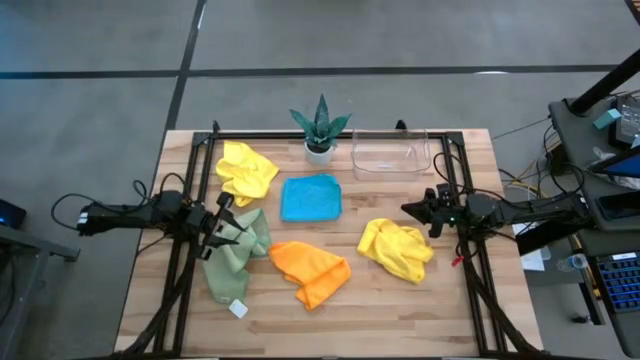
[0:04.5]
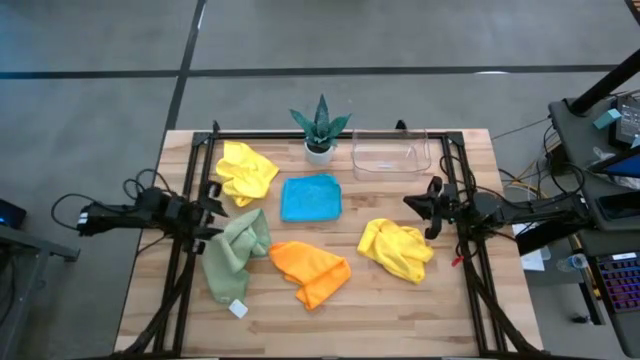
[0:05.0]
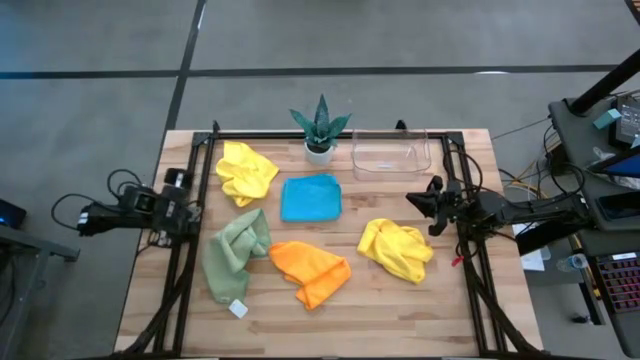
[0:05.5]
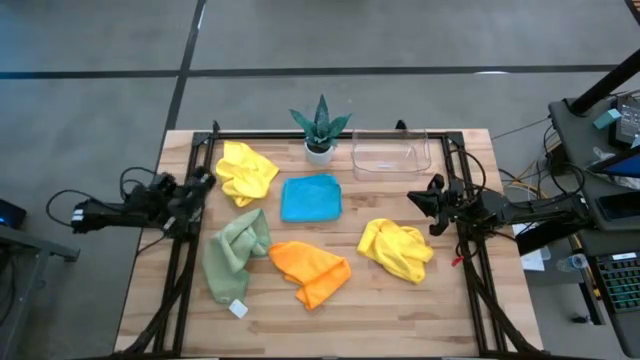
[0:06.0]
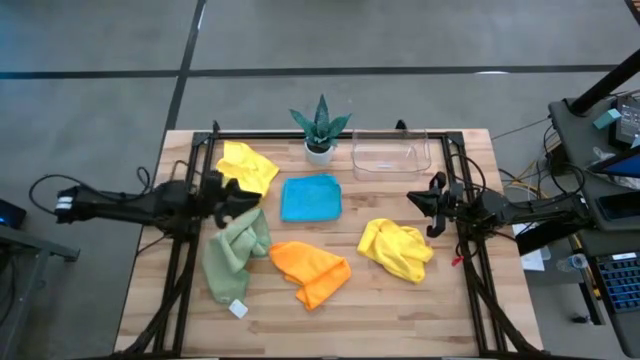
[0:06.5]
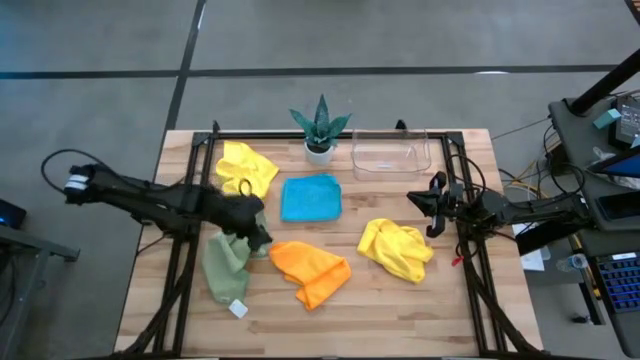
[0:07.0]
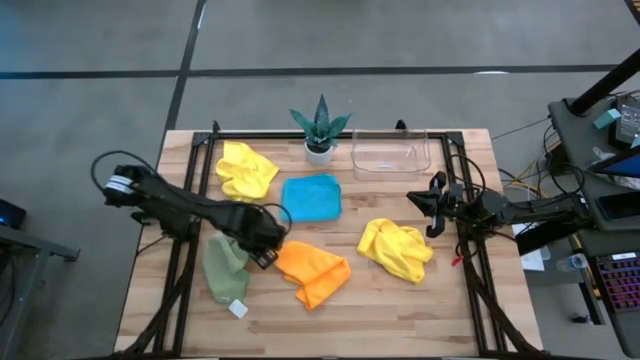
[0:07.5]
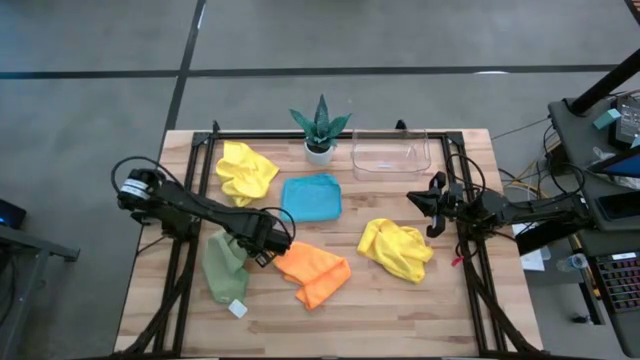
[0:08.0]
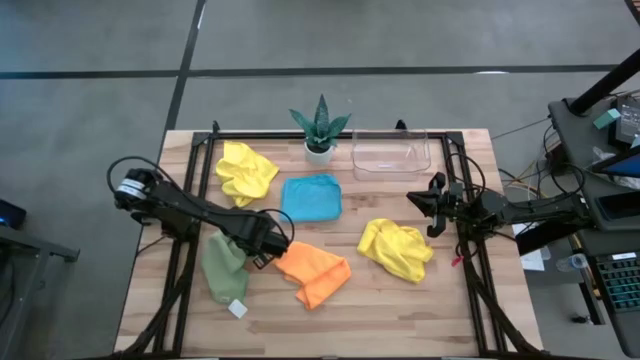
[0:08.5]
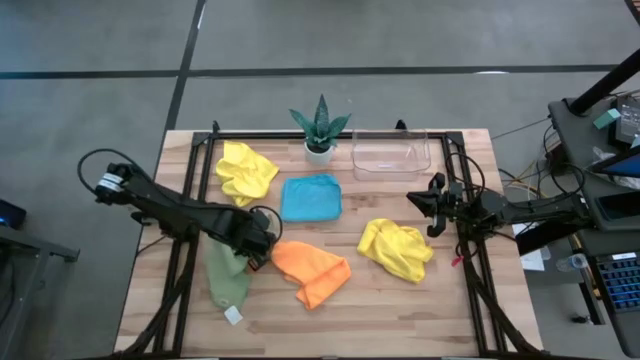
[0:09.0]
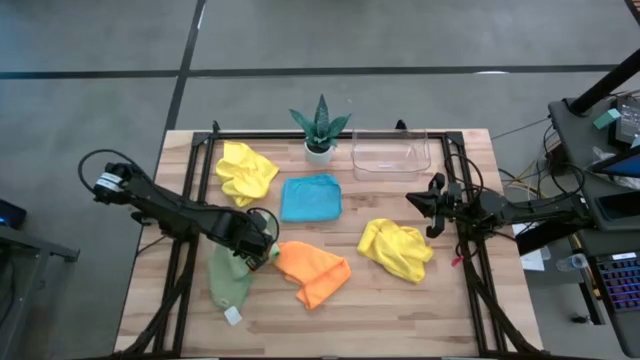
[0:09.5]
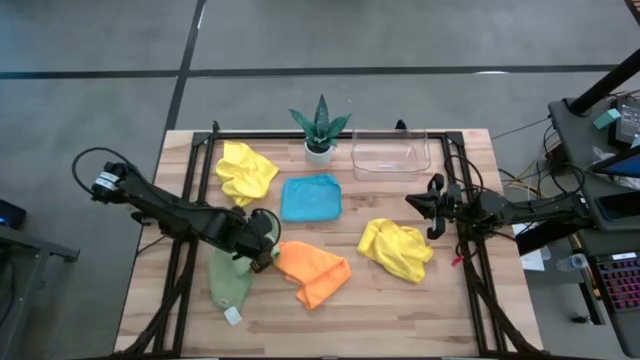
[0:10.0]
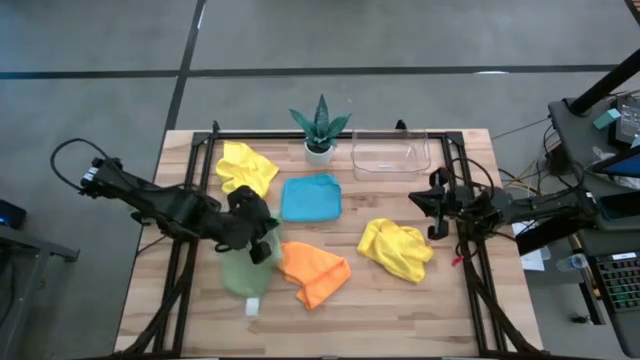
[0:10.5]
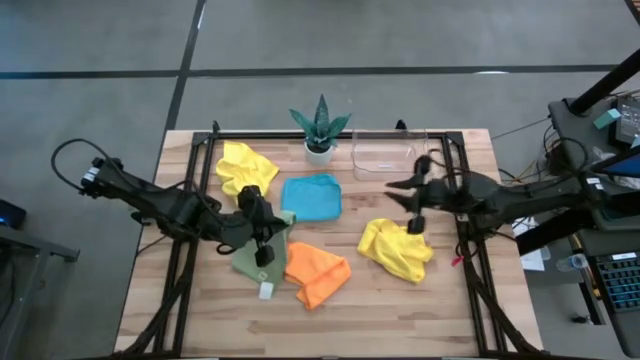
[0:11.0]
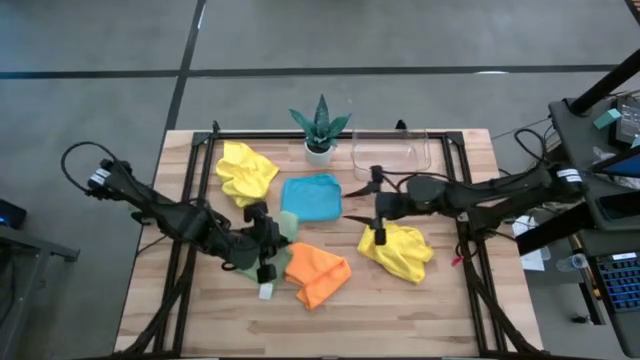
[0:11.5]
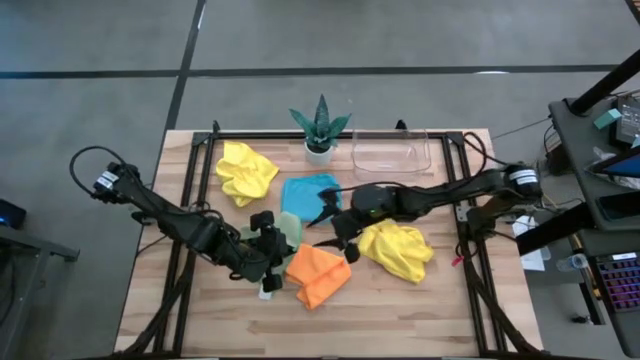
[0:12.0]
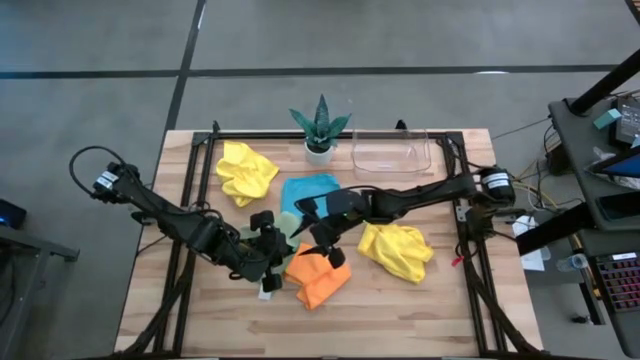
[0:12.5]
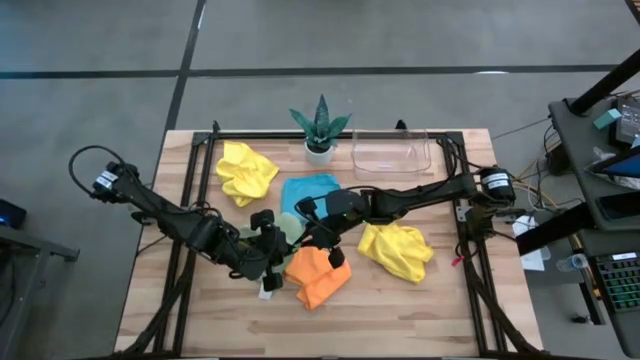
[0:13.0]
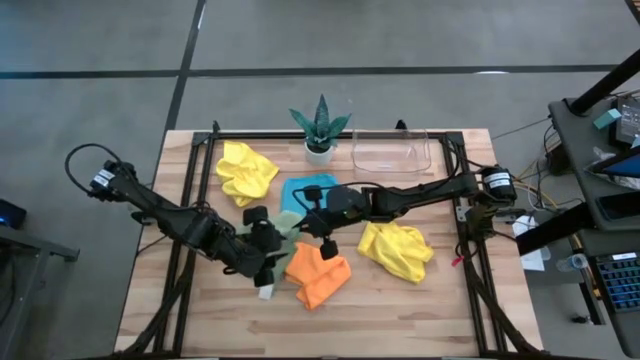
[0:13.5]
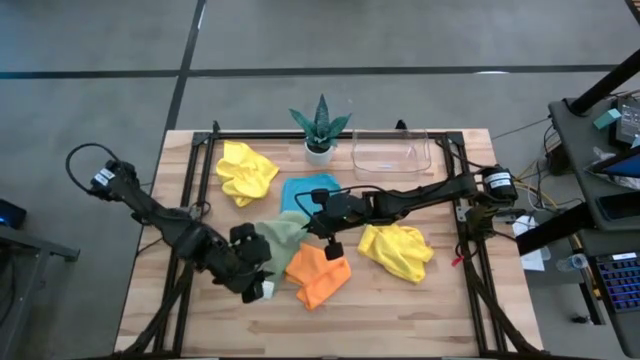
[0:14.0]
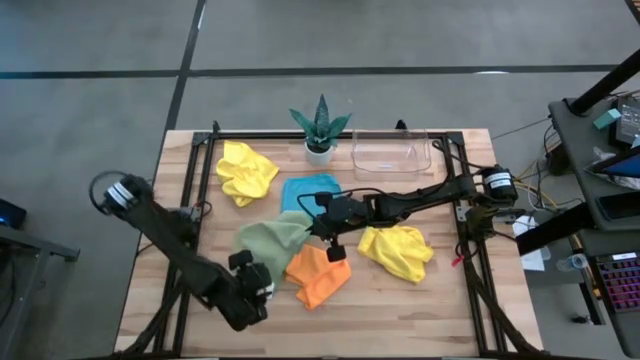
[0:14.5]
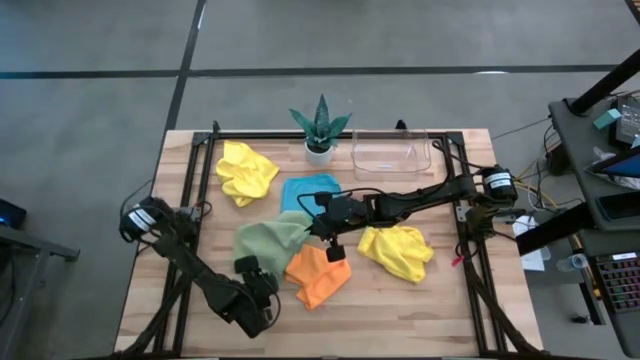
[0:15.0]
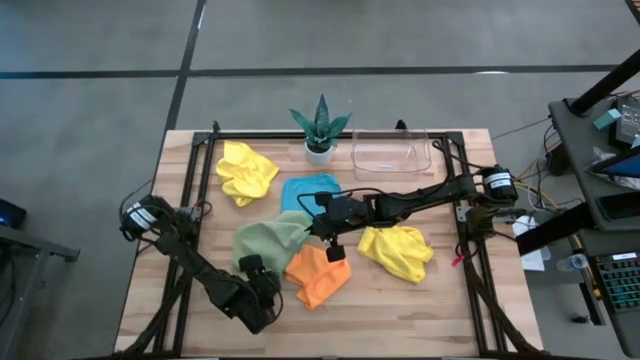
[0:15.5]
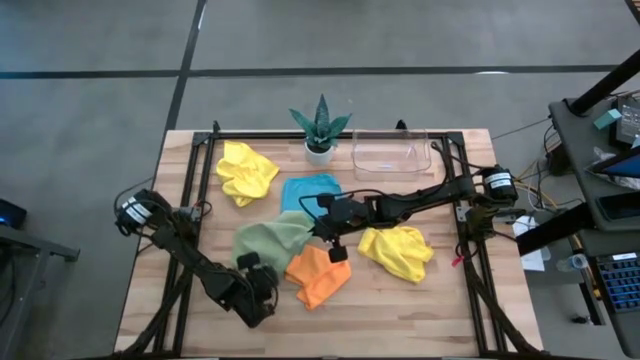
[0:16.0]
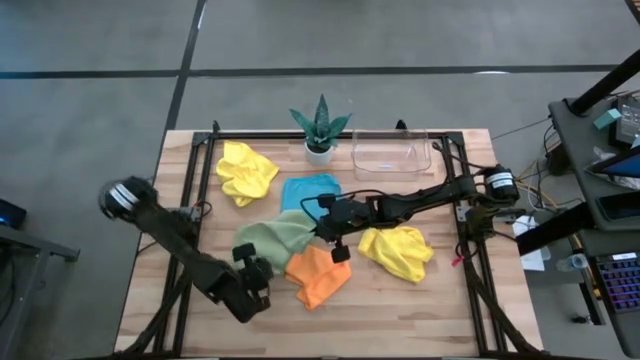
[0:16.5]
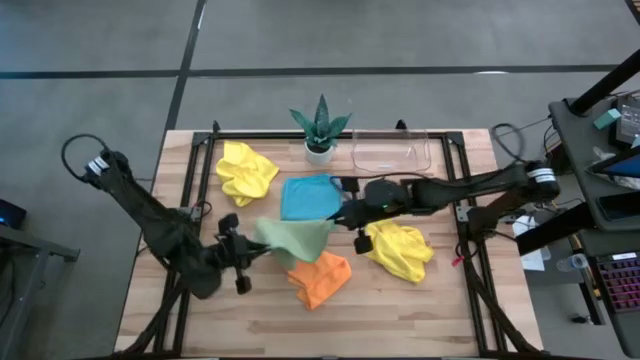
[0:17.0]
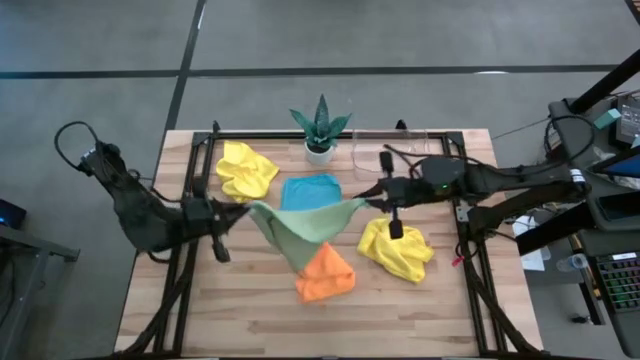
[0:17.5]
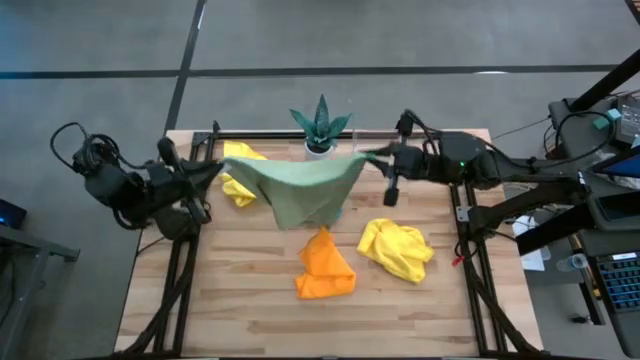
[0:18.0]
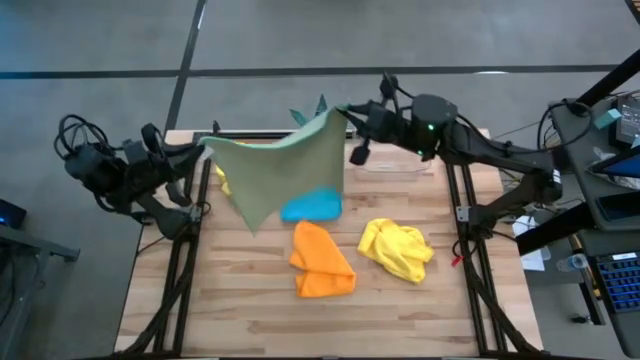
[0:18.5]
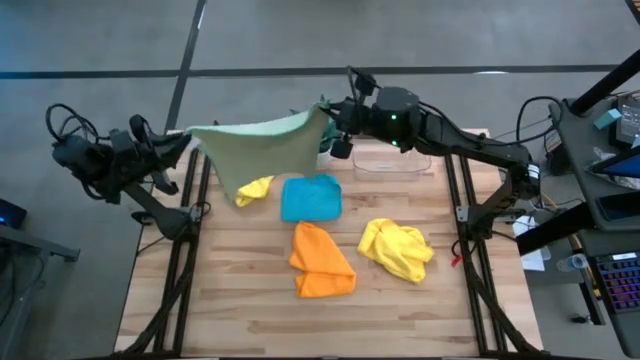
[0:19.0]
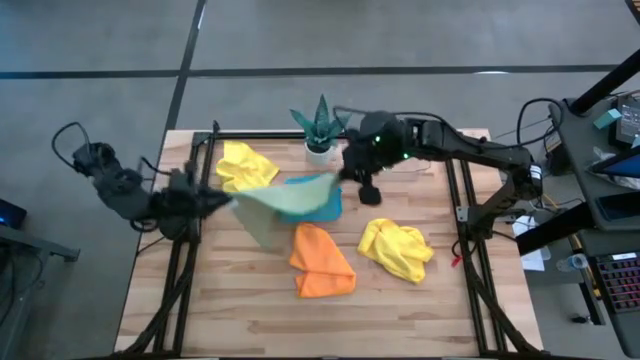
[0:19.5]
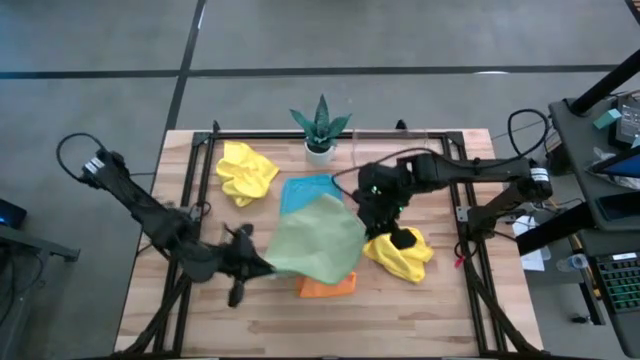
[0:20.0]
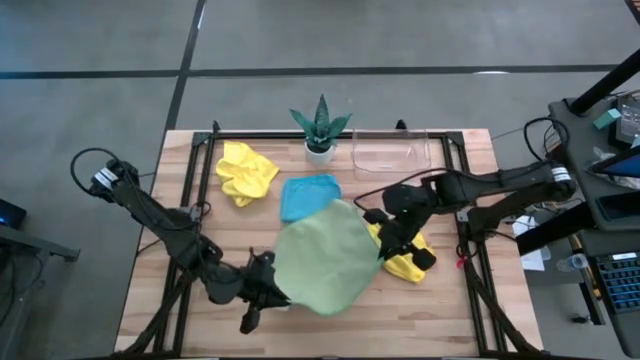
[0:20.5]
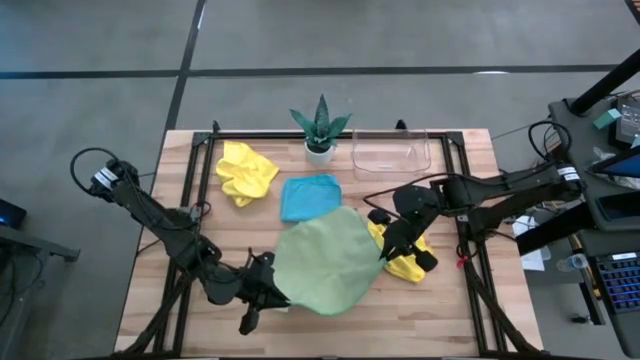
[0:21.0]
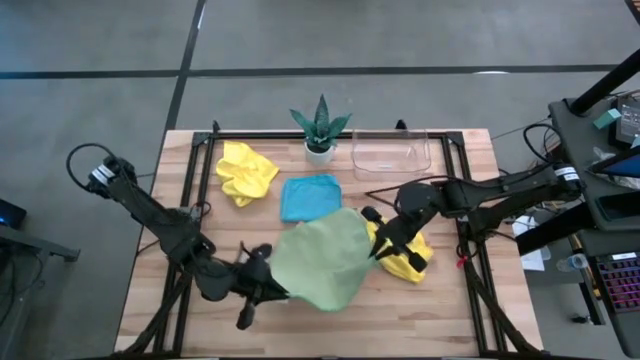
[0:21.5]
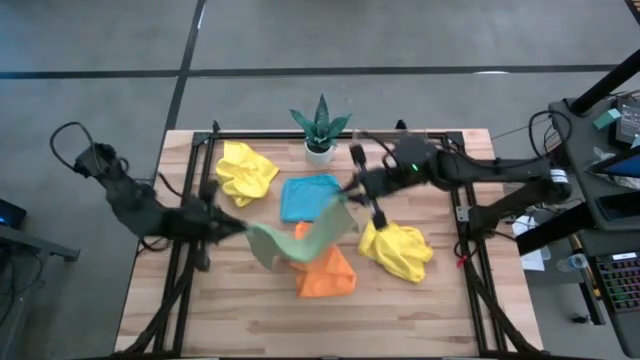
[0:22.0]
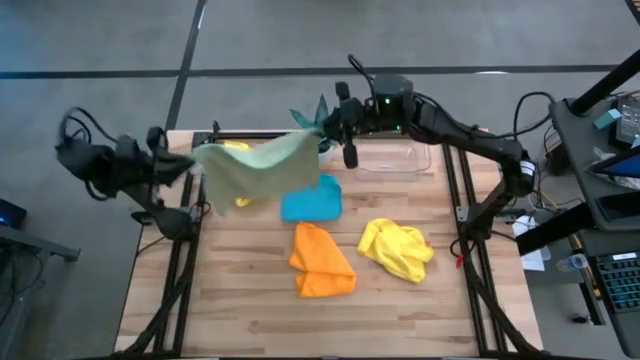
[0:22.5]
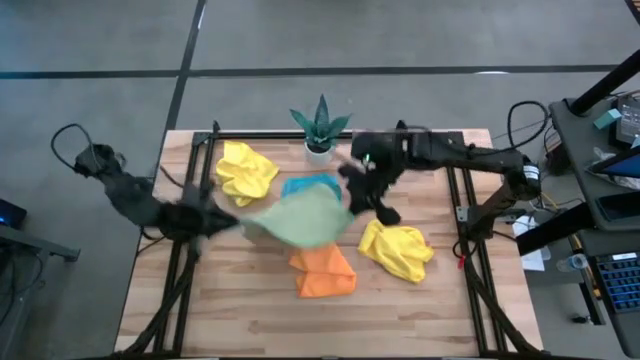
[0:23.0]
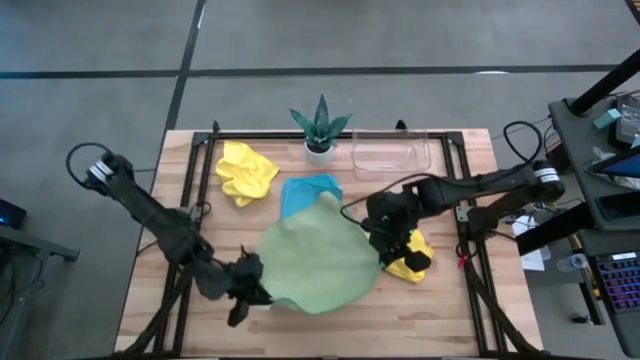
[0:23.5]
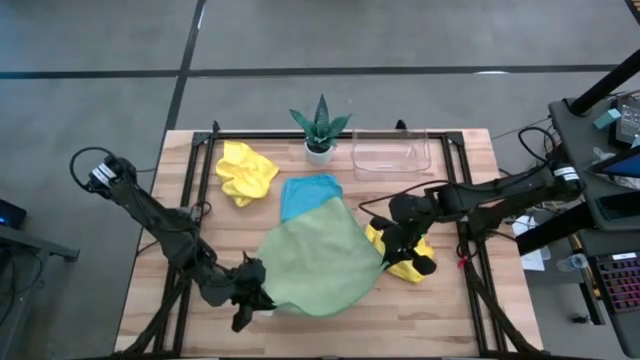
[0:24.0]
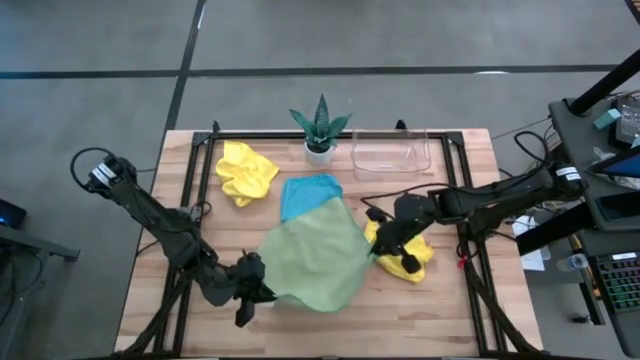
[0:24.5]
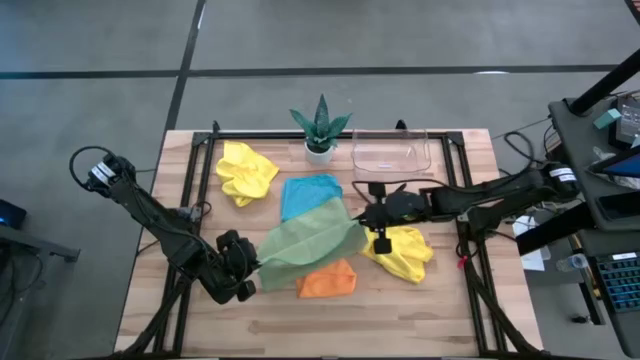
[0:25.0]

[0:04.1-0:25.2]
Task: Fold microfiber towels
Fold the green microfiber towel
